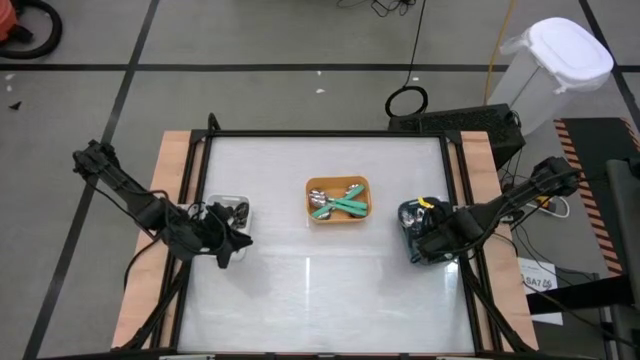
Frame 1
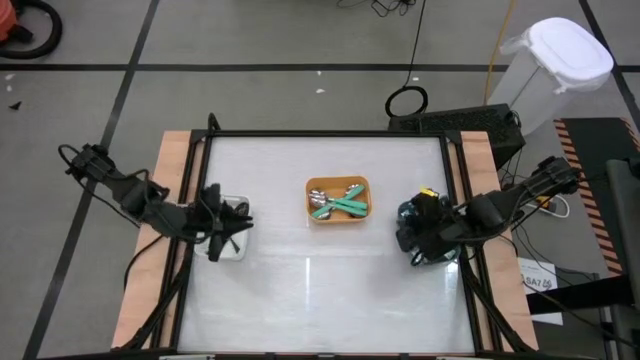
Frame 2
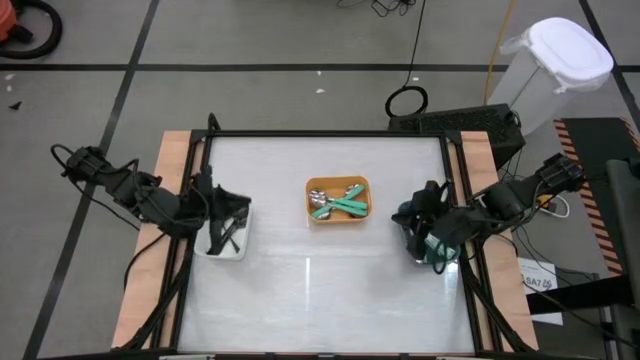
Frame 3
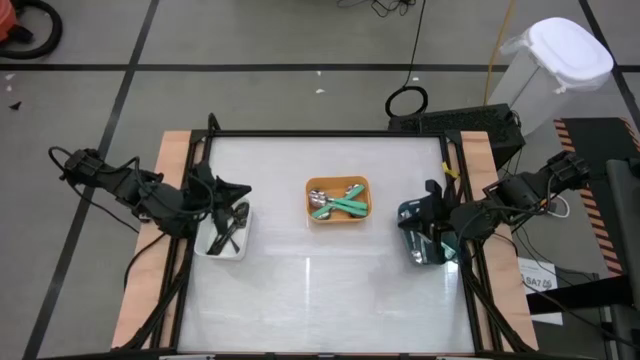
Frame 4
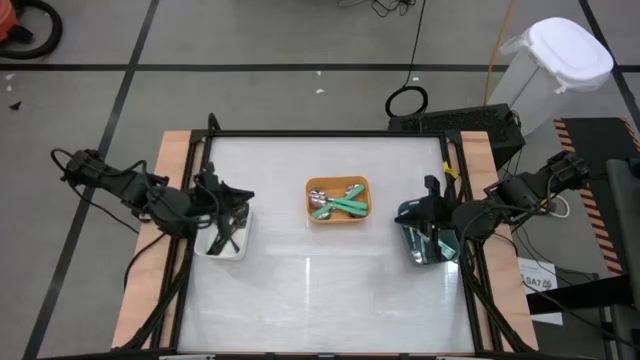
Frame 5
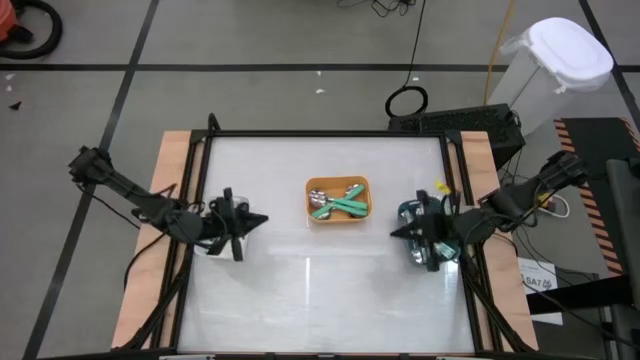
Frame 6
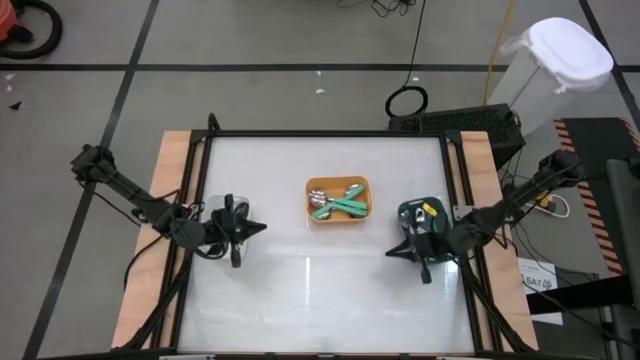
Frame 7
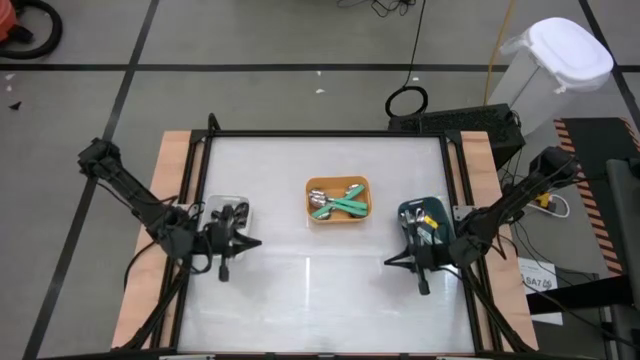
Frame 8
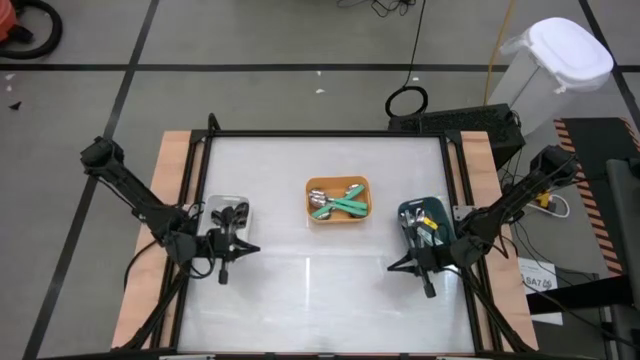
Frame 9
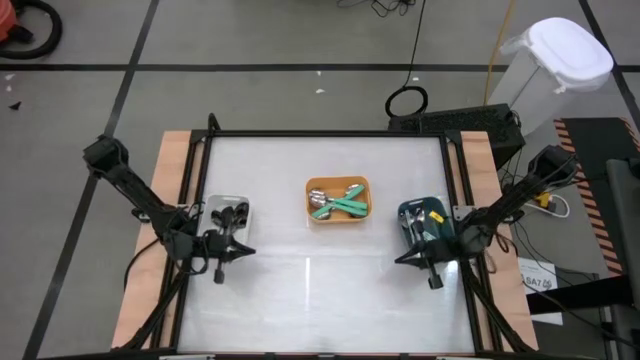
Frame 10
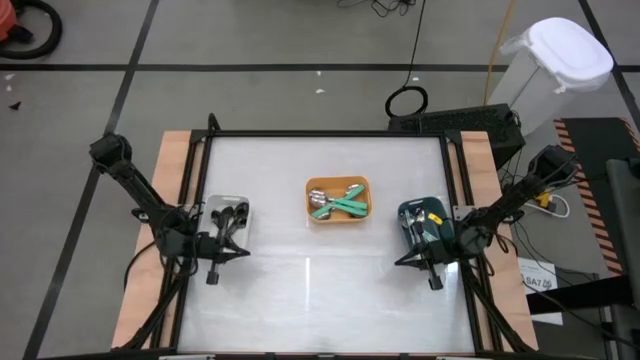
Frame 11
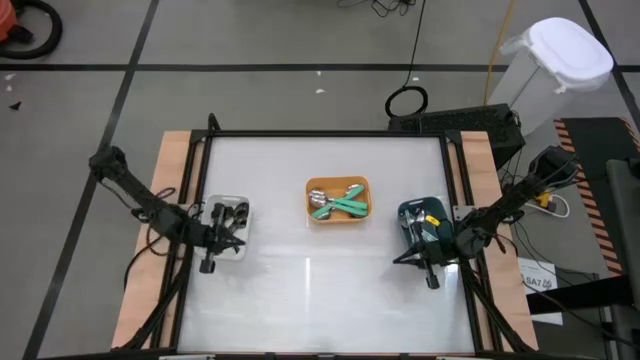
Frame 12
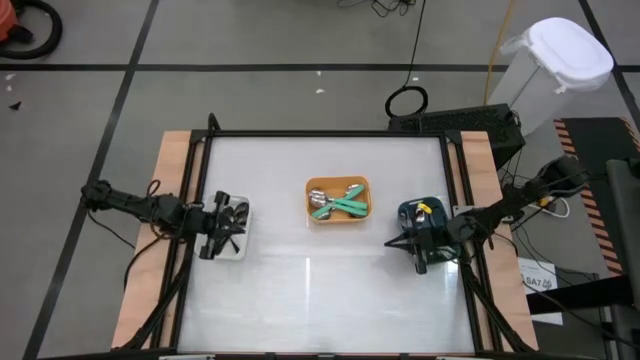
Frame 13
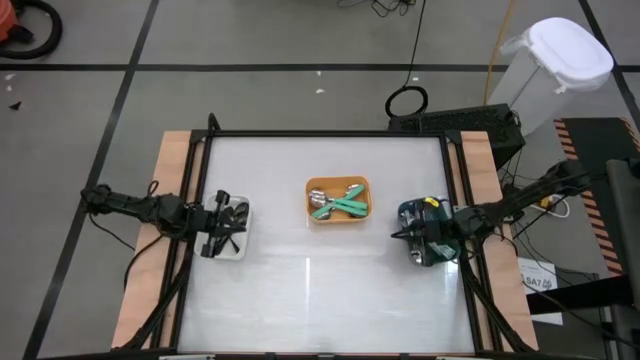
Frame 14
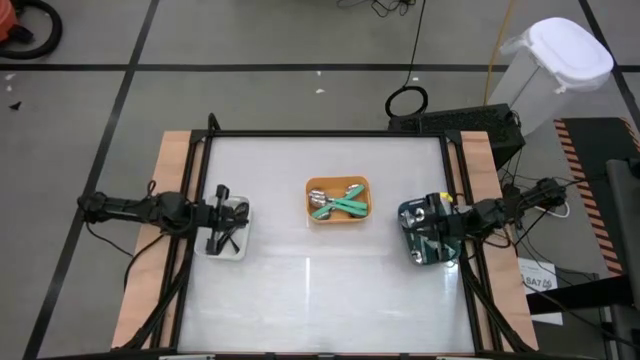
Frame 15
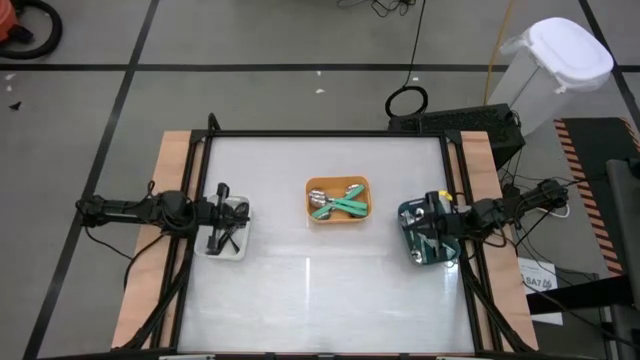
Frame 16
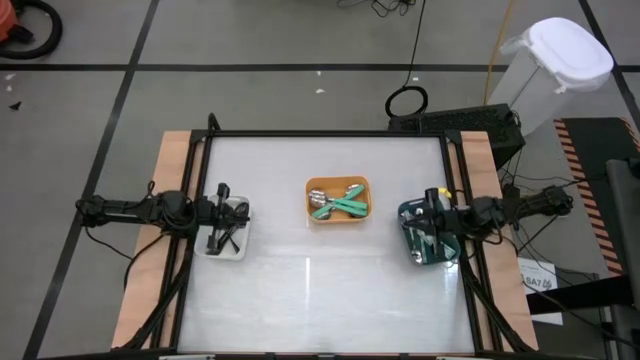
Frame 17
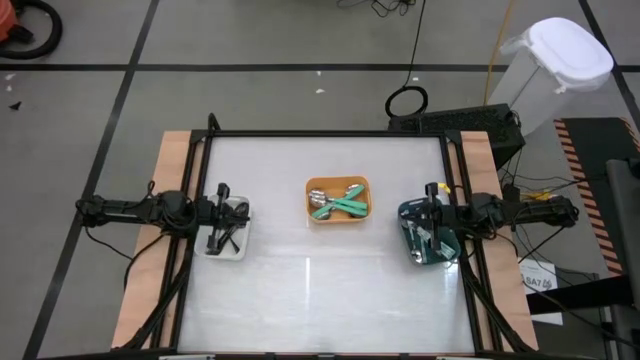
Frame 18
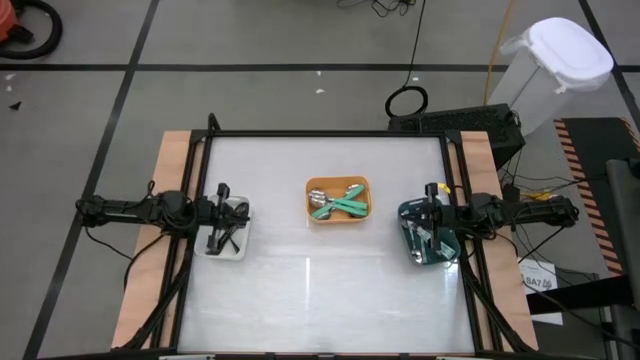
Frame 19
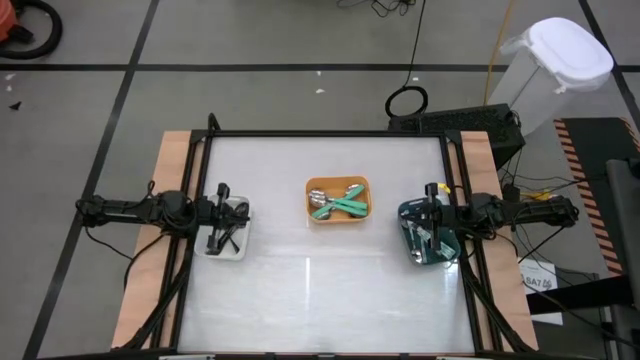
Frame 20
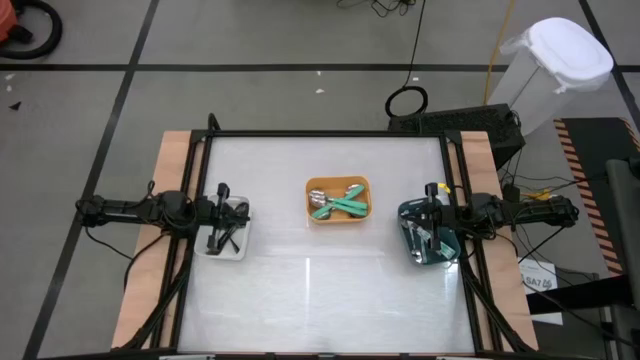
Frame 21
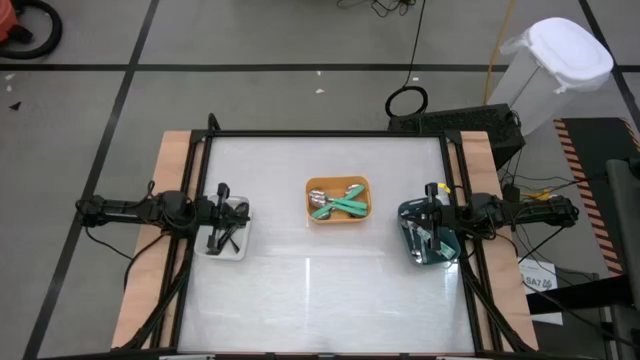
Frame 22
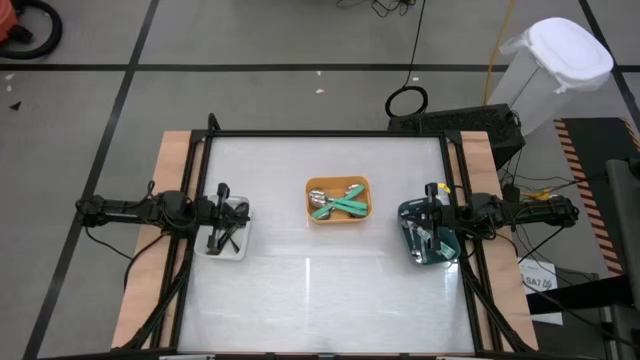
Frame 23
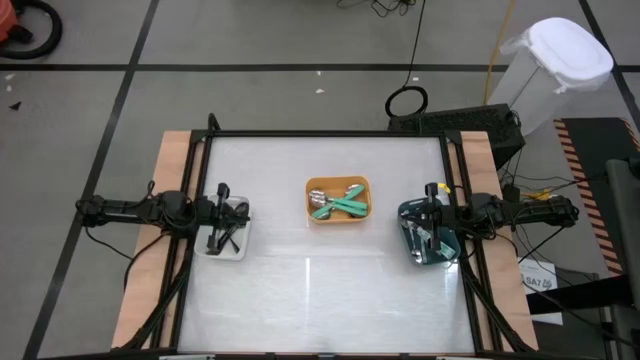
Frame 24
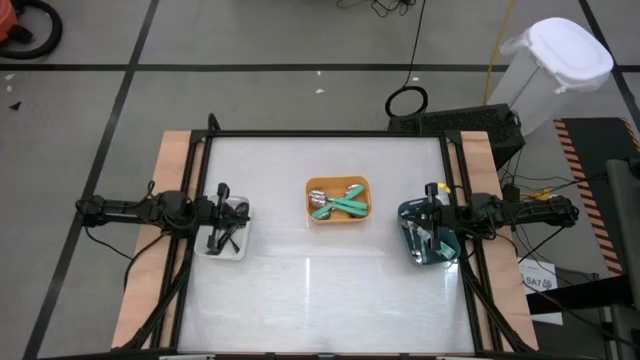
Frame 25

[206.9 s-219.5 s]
Task: Sort silverware by color (type)
Return to Home Position

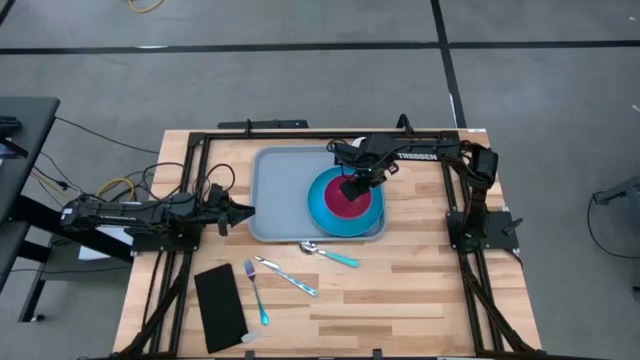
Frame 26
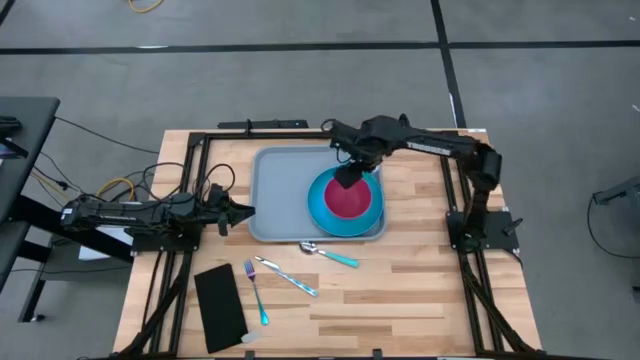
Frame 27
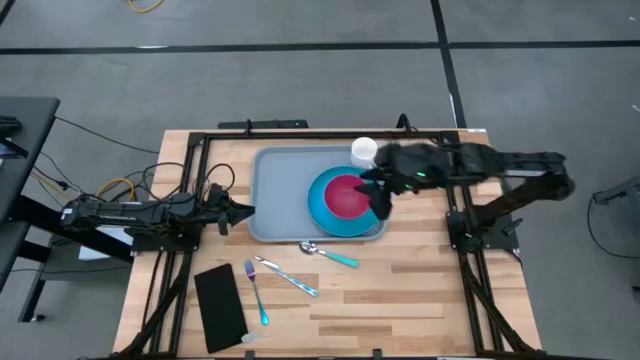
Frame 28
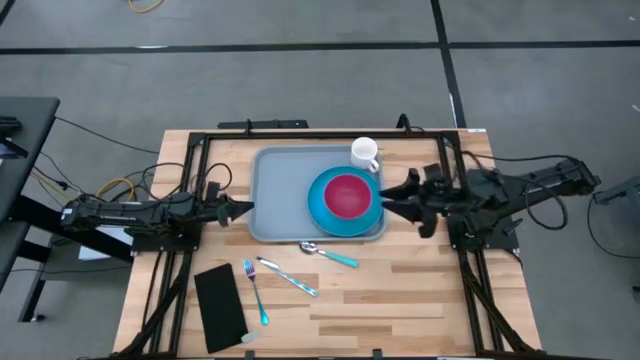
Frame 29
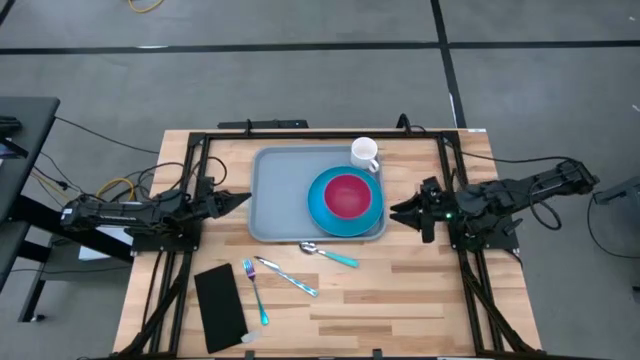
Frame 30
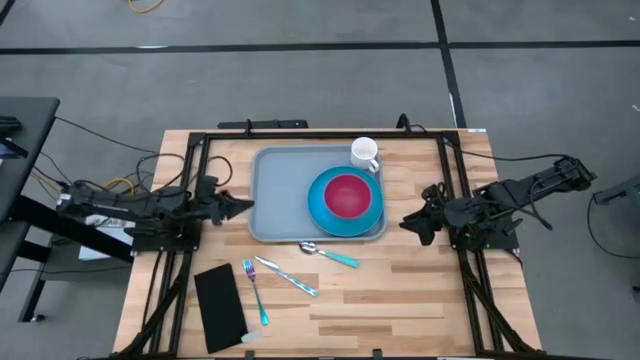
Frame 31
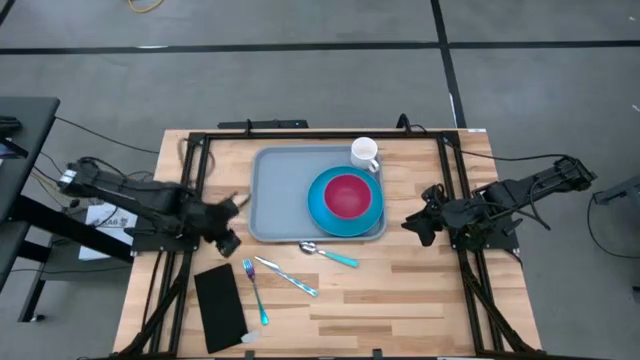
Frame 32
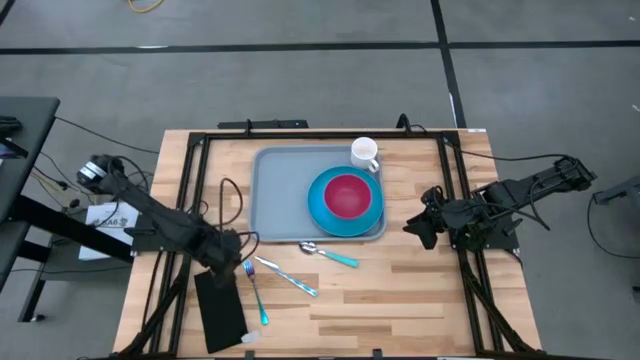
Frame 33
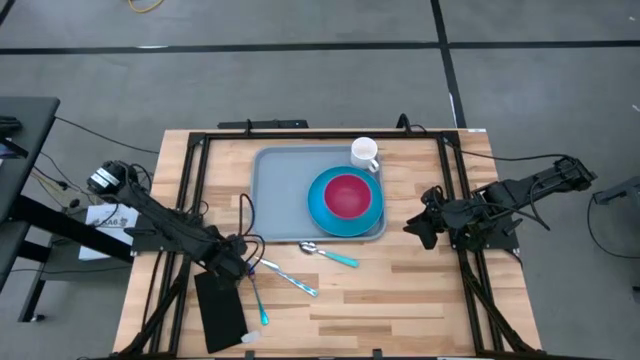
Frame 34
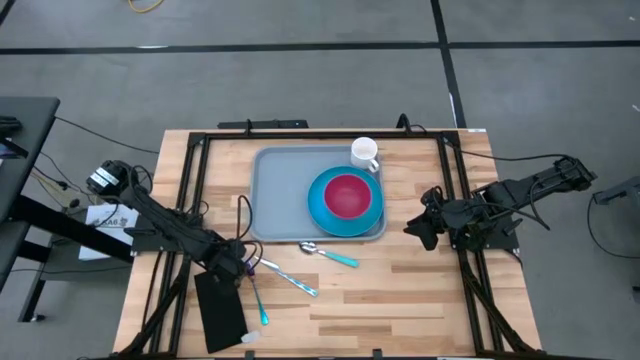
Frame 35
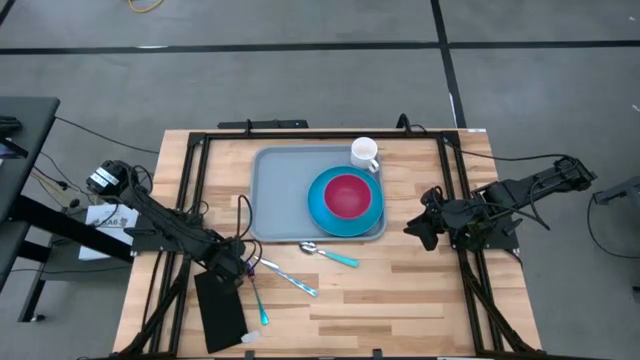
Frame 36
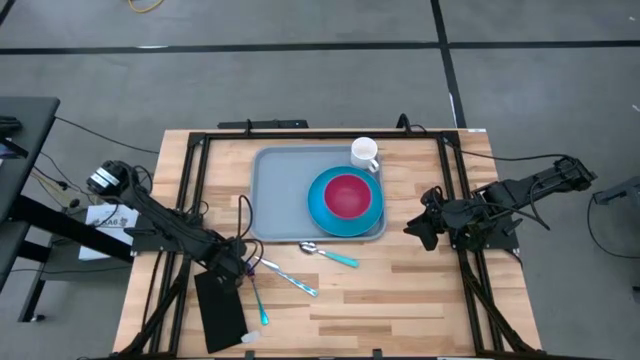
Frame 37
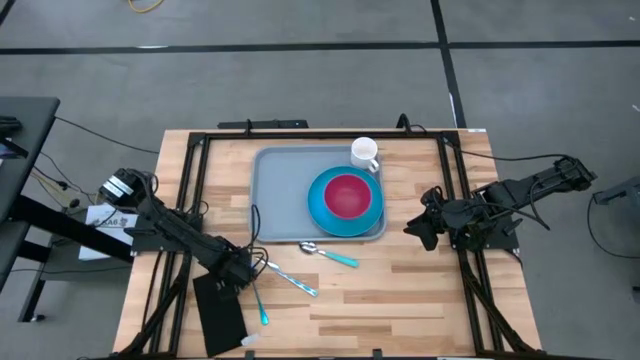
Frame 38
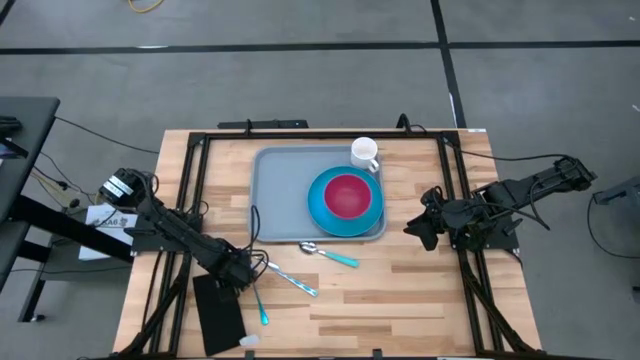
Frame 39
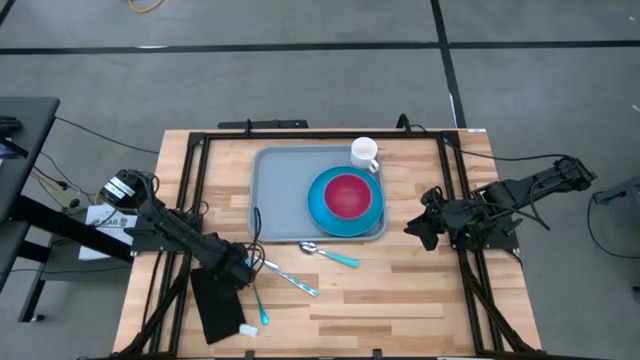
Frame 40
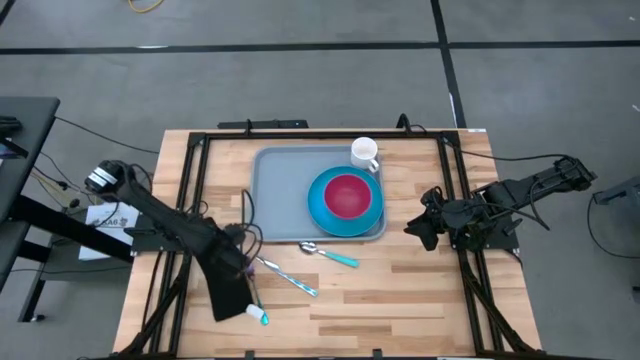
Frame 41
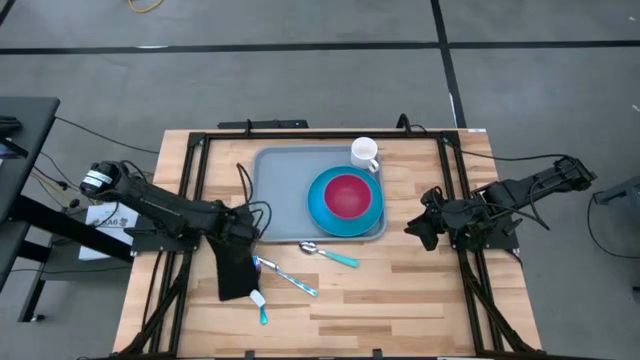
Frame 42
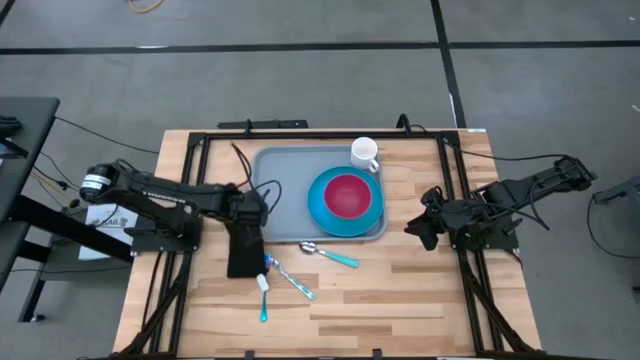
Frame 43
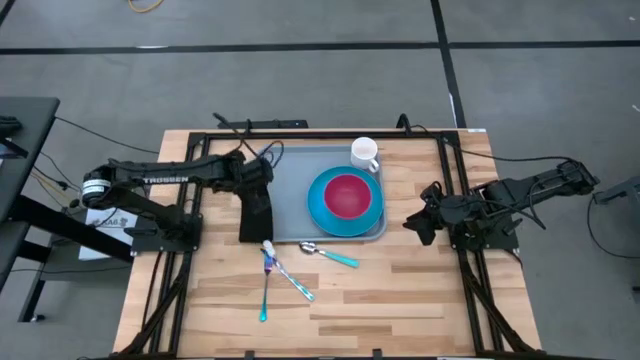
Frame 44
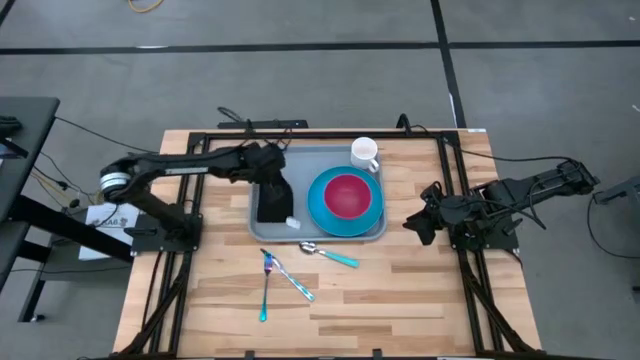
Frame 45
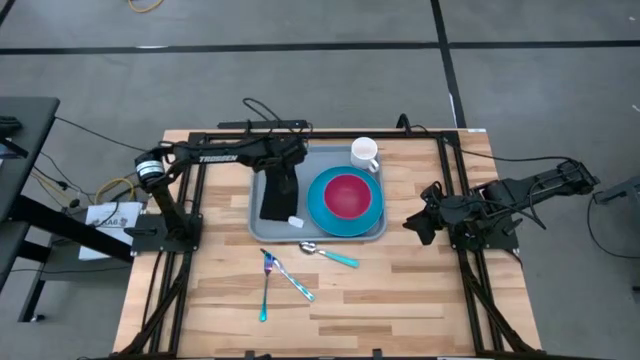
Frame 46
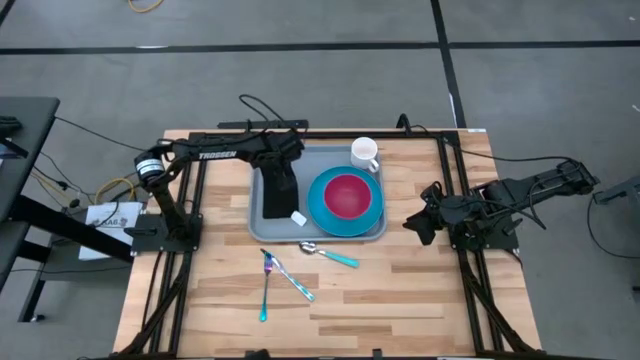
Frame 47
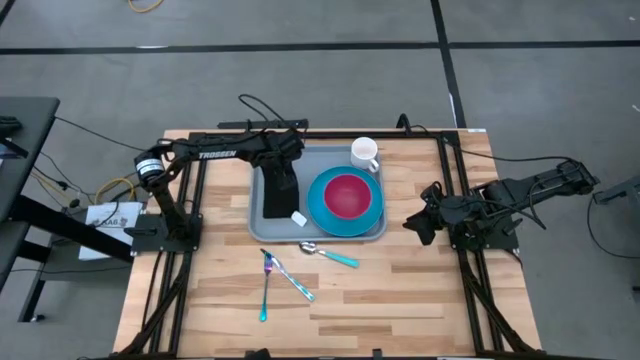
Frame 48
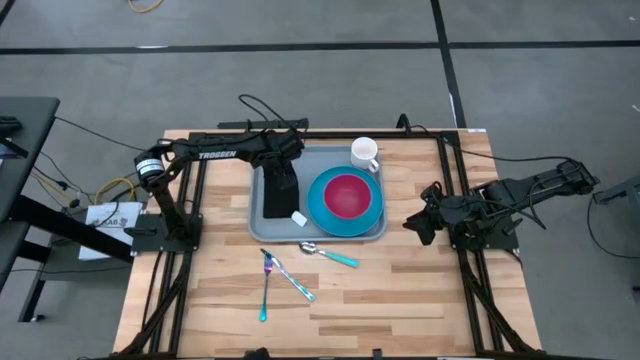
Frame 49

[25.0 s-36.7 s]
Task: Set up tray
Put the black napkin to the left of the blue plate on the gray serving tray
